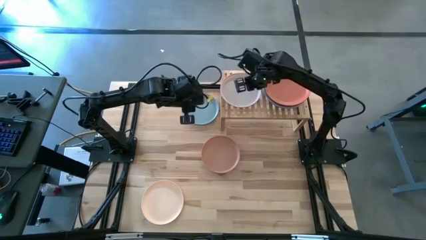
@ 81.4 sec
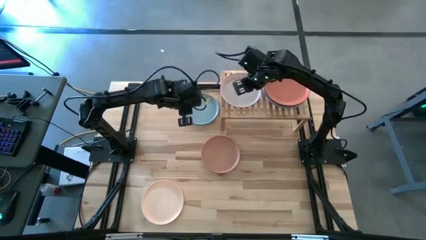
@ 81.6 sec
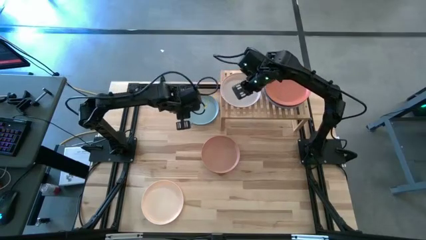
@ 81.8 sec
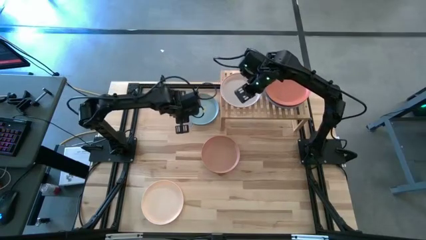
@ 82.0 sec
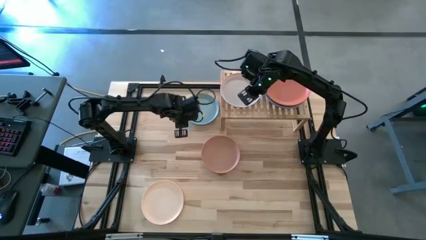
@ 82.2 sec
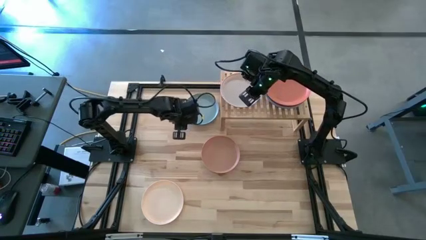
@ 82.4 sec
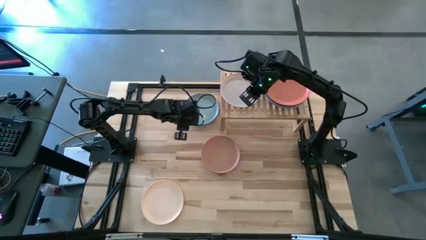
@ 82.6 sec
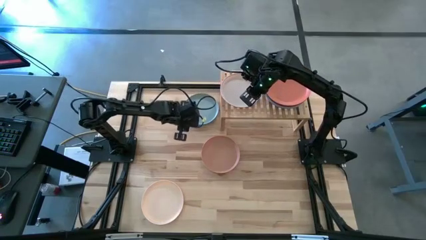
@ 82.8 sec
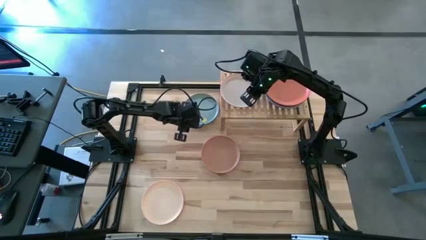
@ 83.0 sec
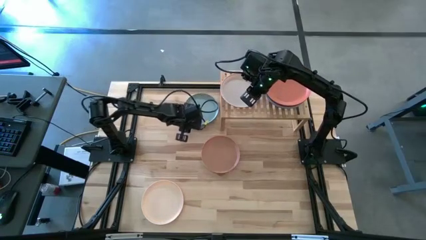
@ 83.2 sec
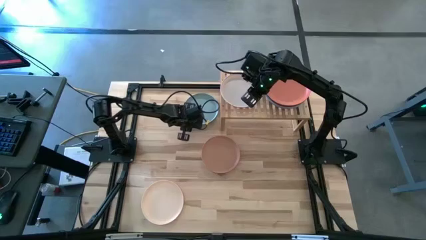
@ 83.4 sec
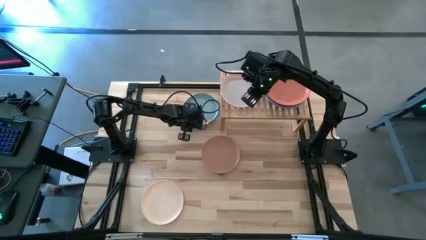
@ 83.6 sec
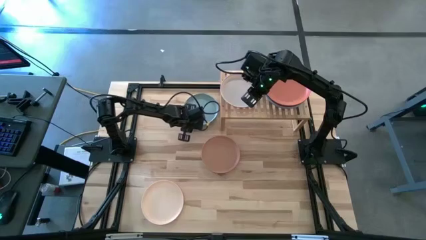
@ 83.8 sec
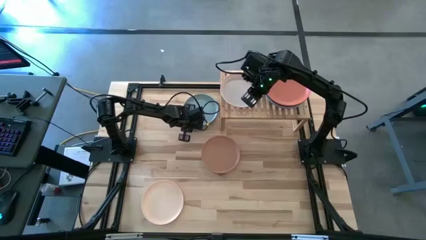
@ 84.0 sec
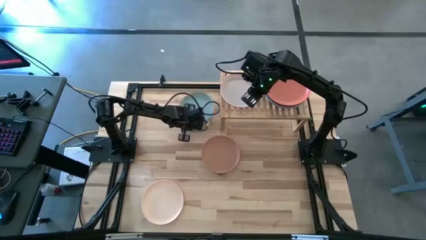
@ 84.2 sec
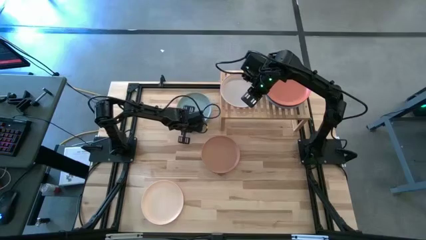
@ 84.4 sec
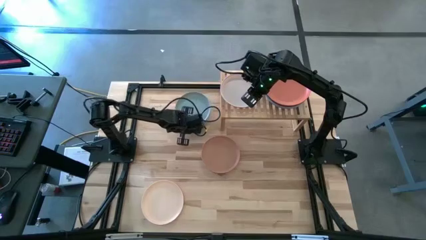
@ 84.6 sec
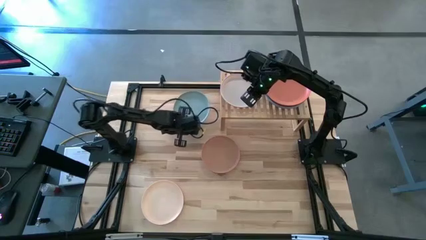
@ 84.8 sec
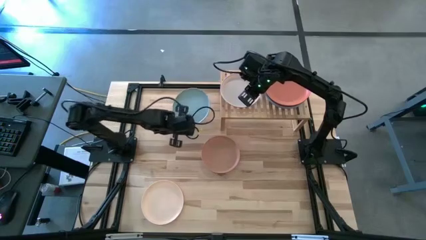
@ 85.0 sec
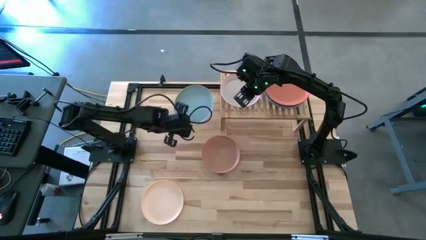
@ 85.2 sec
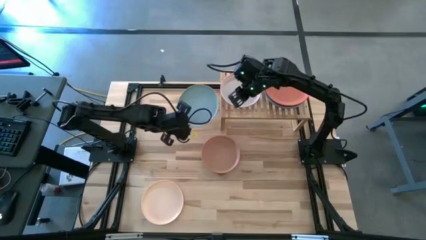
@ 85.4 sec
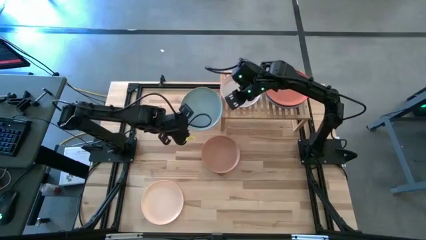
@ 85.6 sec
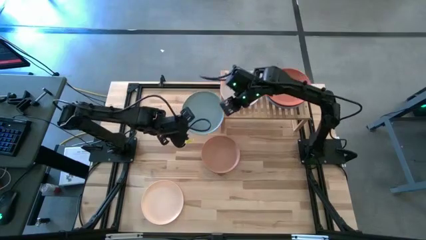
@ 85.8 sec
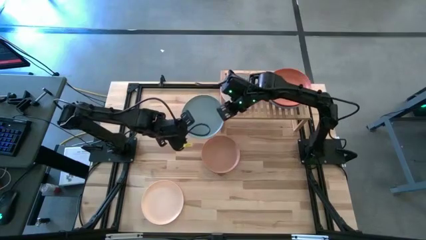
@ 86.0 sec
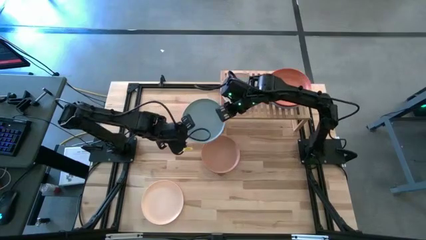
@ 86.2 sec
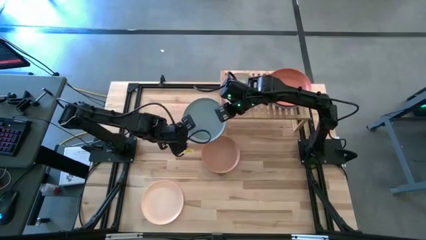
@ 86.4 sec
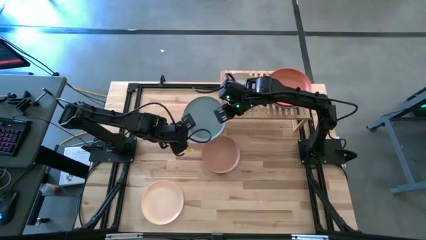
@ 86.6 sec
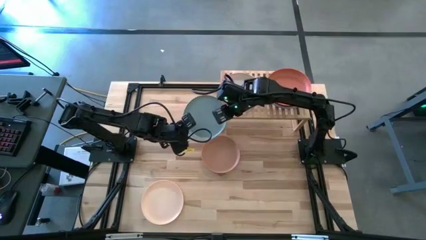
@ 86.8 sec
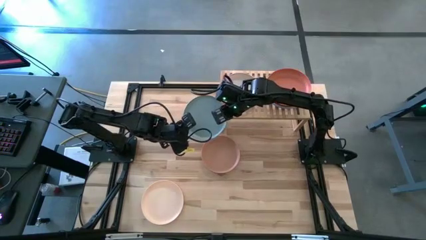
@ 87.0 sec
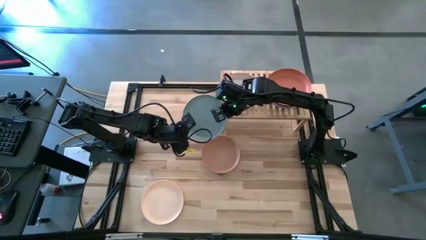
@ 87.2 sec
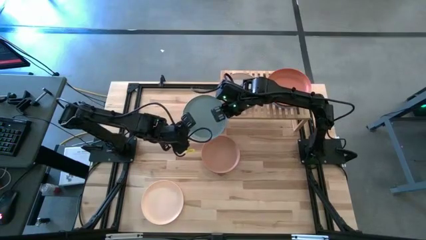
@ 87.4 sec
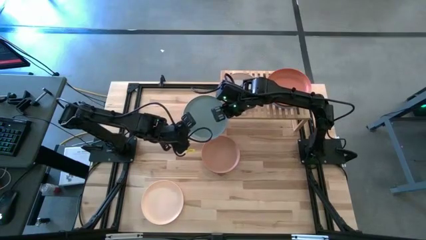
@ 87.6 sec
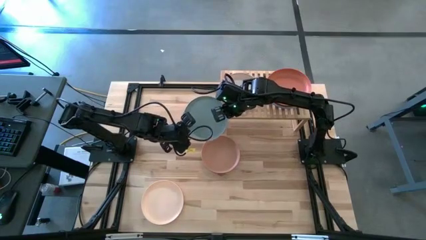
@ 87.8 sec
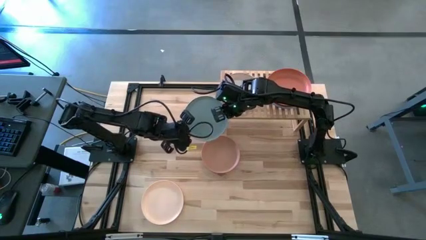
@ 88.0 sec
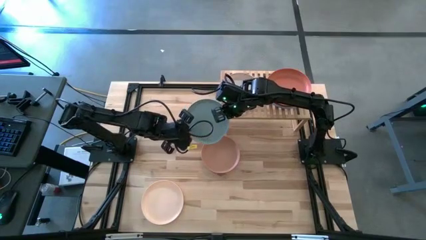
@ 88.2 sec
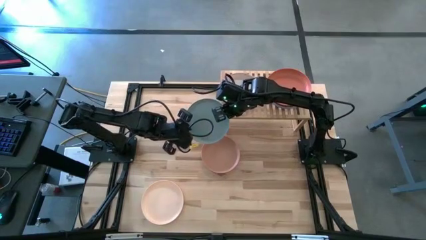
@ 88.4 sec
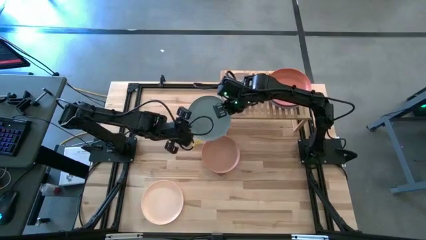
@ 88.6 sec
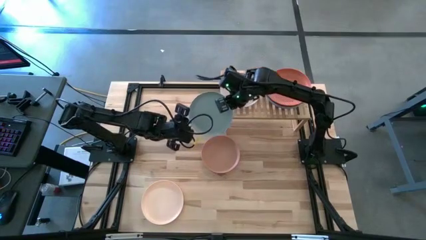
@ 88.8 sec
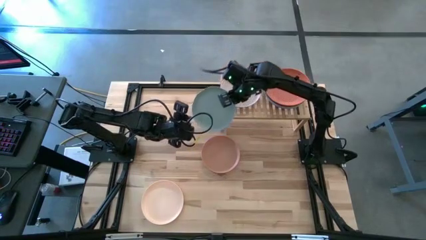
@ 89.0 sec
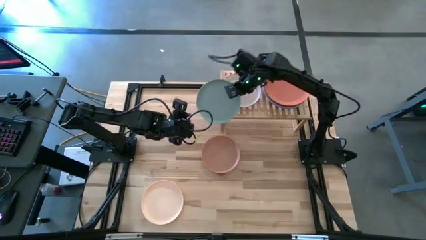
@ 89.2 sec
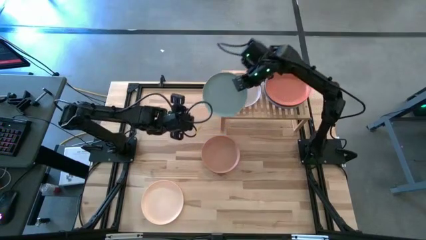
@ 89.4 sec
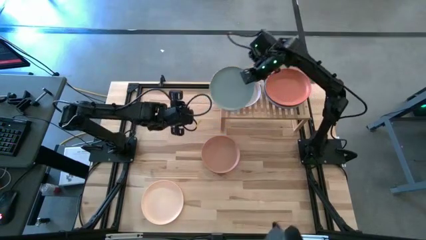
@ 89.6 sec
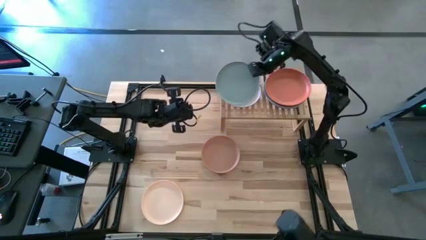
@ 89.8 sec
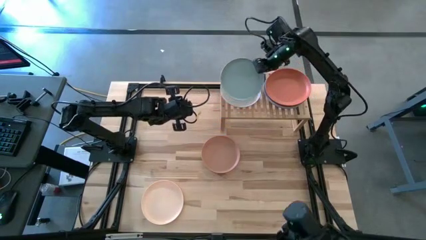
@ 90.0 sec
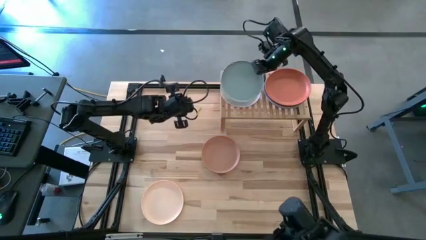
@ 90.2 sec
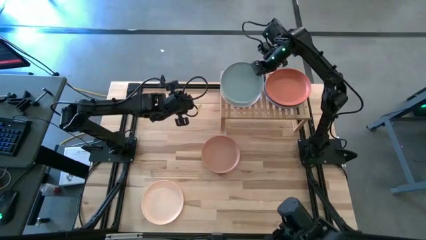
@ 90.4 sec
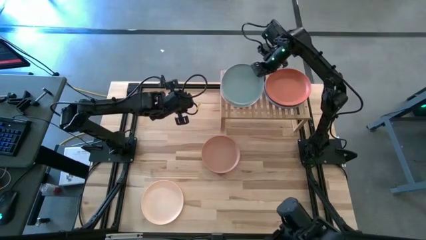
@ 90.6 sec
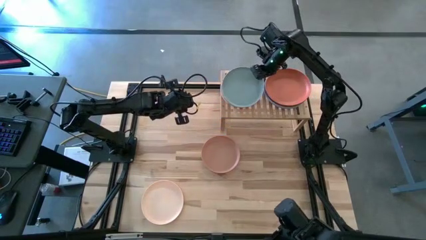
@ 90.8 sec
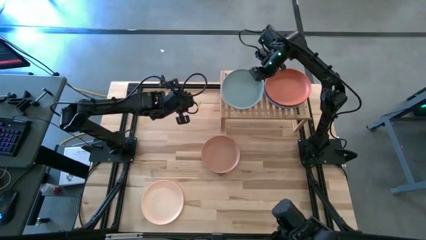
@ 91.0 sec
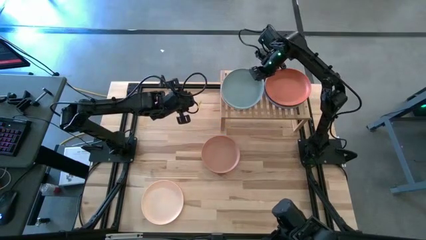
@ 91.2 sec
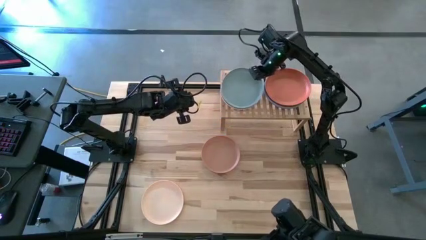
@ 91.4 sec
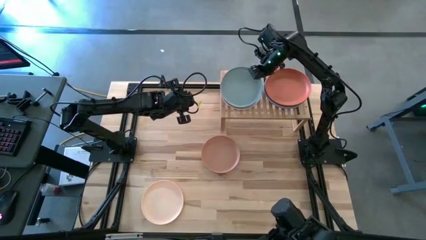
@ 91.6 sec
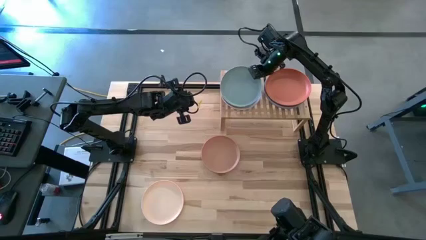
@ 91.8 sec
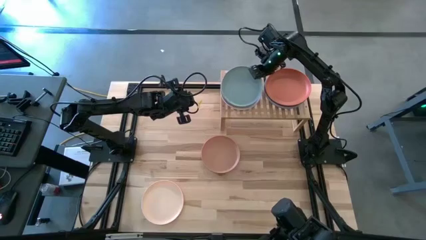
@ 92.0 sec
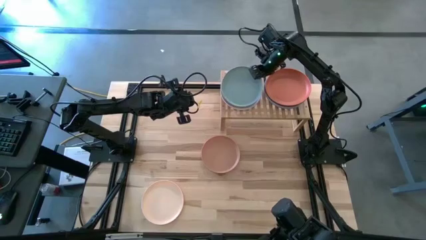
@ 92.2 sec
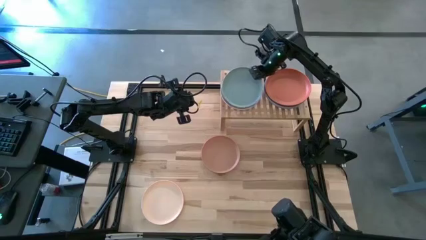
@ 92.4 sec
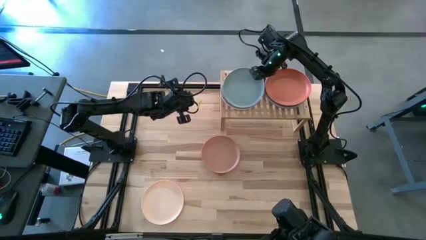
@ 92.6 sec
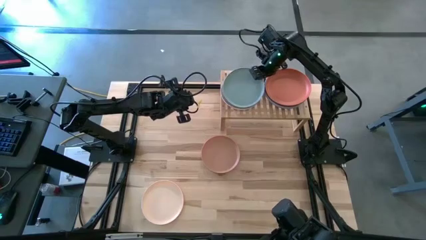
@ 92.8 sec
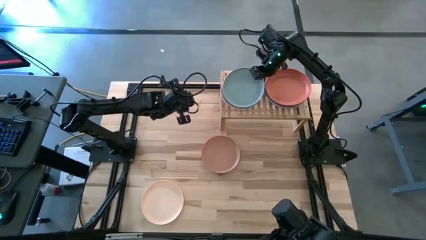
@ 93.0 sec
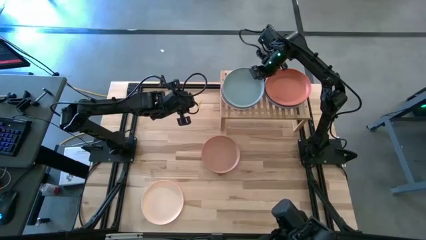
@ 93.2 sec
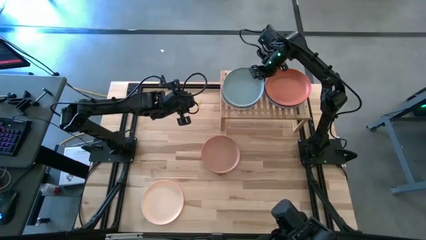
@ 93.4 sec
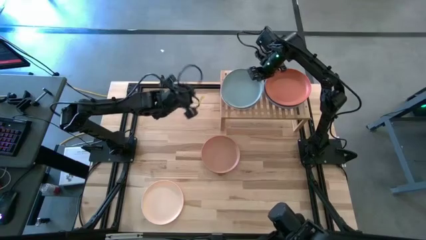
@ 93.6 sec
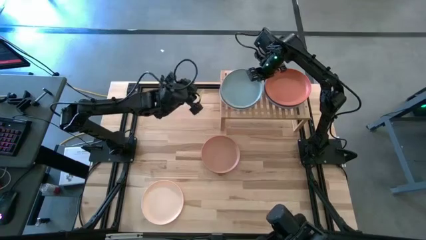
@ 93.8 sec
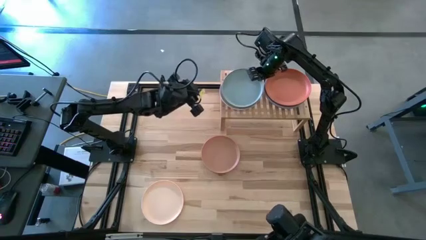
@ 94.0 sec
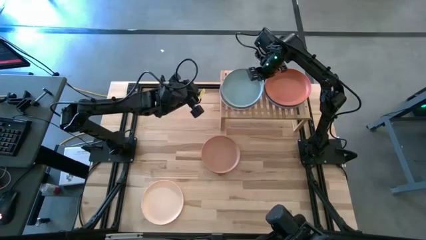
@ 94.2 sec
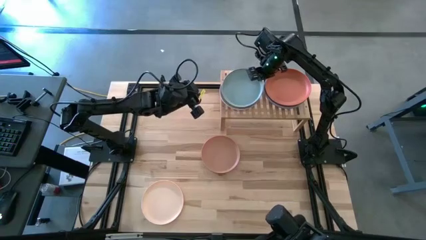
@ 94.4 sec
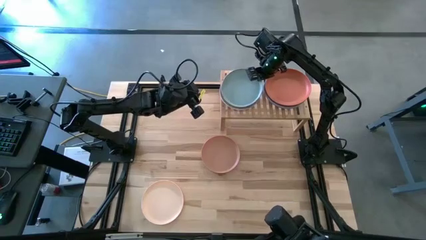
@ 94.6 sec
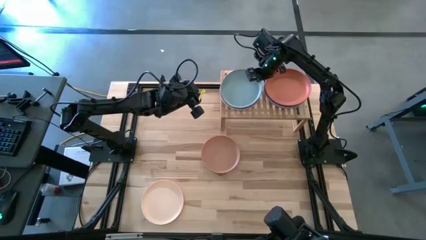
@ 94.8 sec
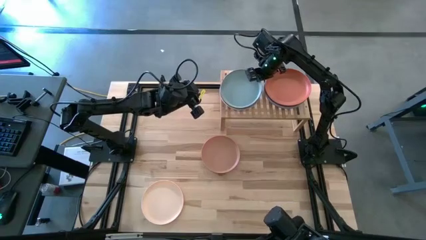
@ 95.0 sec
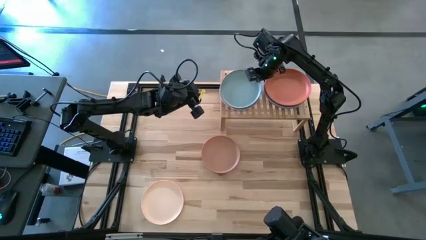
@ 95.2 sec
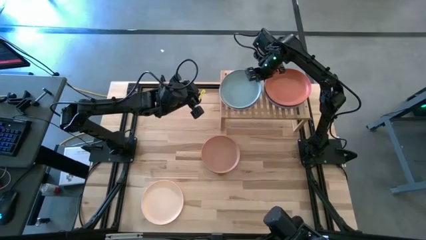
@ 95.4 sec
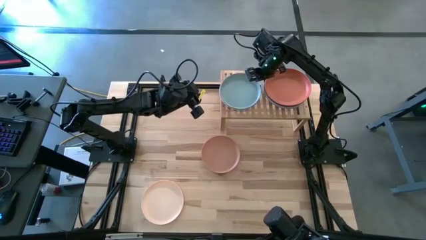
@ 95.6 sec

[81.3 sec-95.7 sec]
Task: Place and stack plates onto a shelf
Stack the gray plate on top of the white plate on the shelf

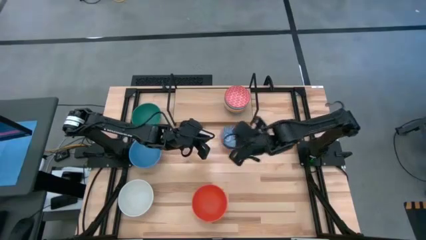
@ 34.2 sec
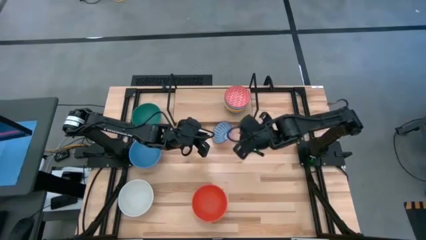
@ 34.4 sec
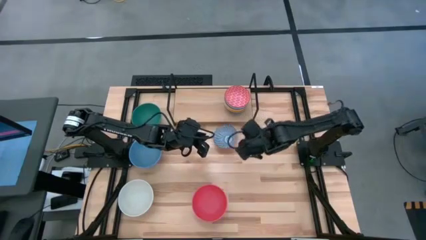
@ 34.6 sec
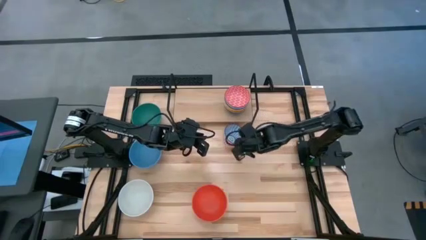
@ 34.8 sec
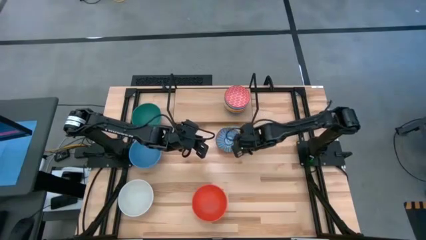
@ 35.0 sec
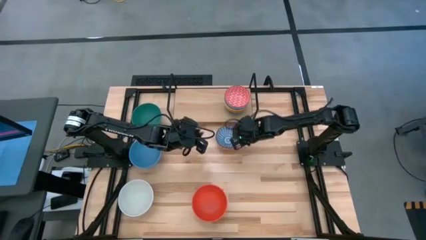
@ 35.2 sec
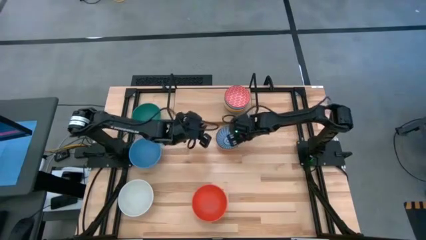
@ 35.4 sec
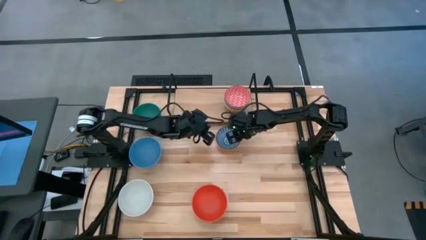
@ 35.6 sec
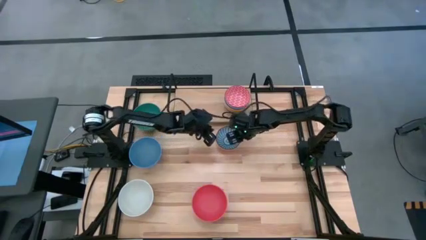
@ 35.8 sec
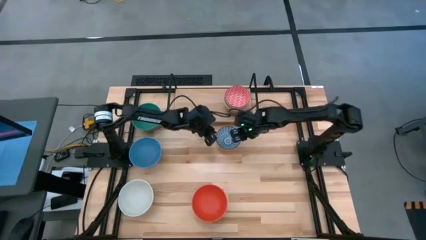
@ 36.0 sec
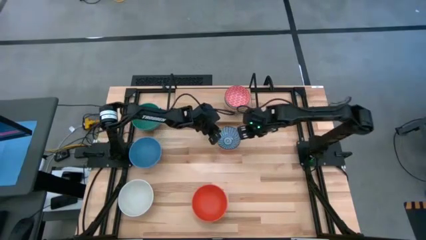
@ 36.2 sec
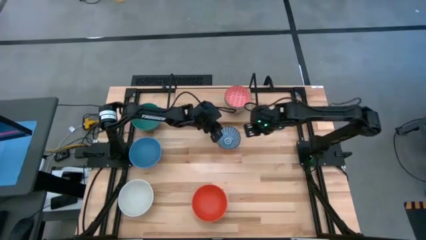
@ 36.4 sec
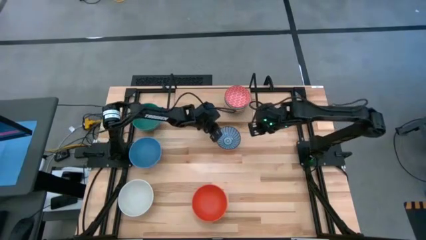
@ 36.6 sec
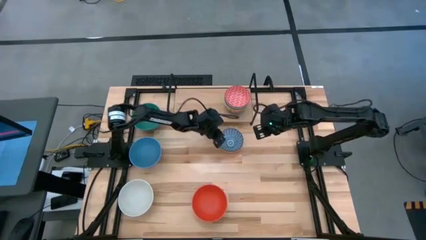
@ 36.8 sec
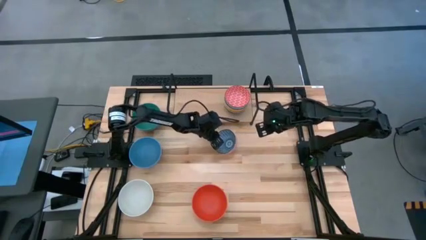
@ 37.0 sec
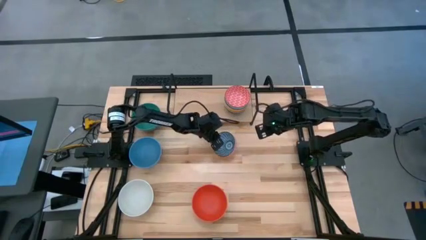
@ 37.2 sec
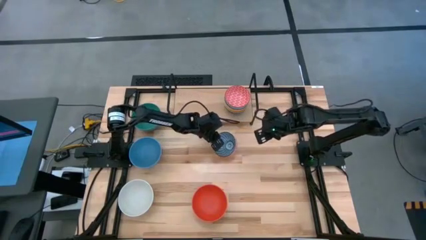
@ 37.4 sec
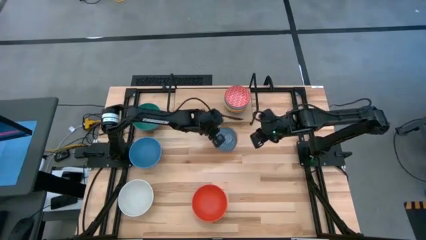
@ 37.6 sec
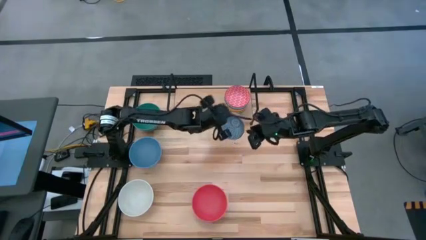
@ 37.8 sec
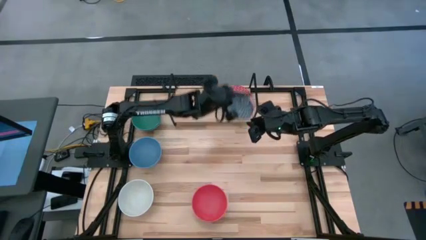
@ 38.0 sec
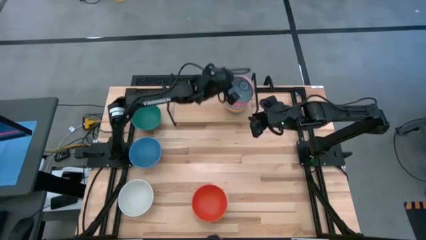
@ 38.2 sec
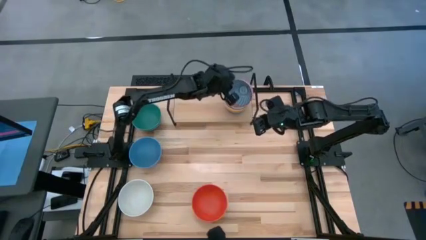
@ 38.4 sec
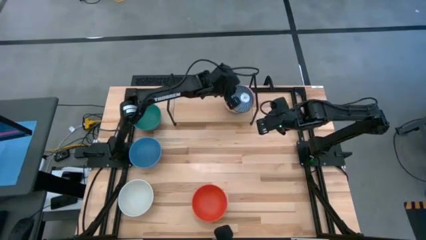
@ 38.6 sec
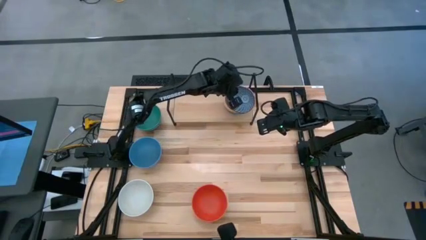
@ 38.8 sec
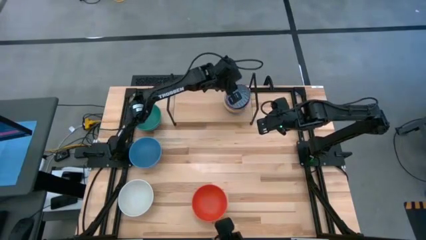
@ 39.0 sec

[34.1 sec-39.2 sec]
Task: Place and stack bowls onto a shelf
Stack the dark blue patterned bowl on top of the red patterned bowl on the shelf
